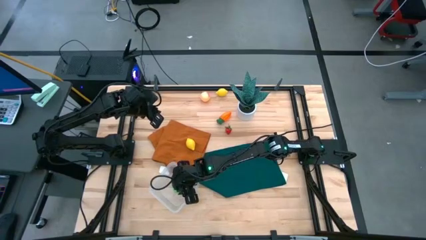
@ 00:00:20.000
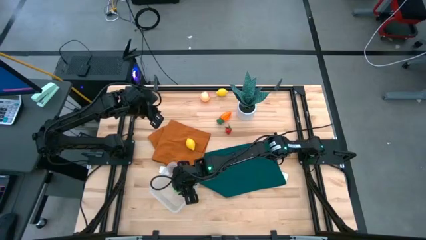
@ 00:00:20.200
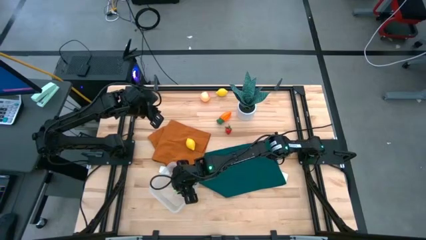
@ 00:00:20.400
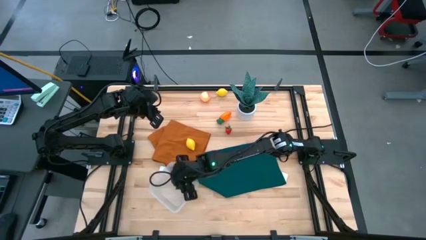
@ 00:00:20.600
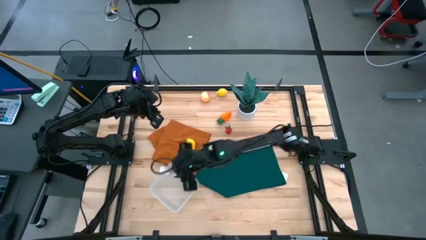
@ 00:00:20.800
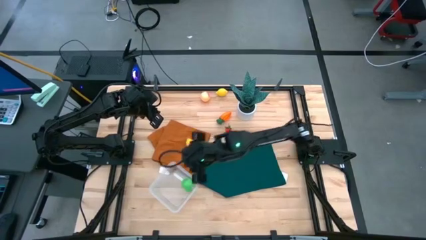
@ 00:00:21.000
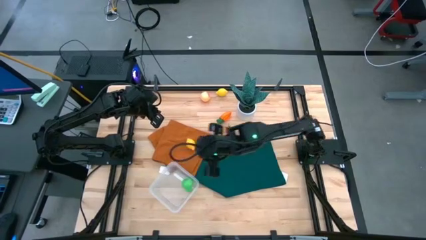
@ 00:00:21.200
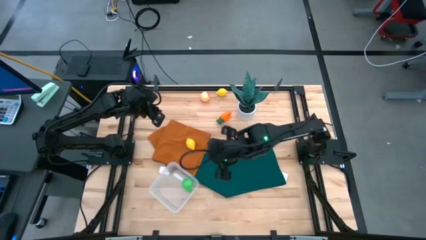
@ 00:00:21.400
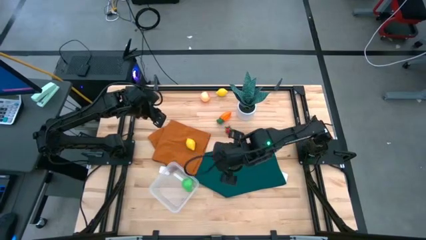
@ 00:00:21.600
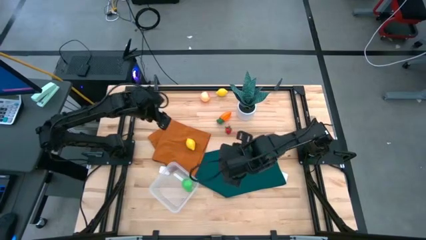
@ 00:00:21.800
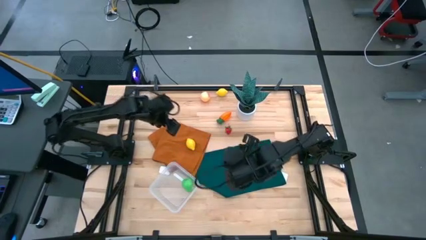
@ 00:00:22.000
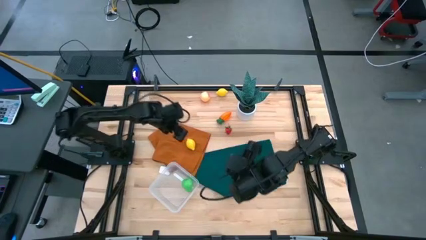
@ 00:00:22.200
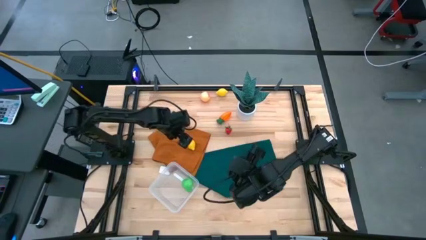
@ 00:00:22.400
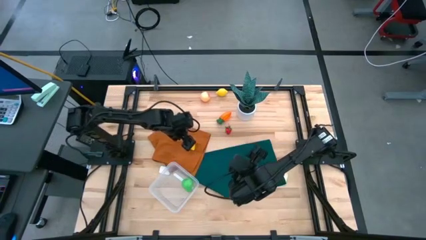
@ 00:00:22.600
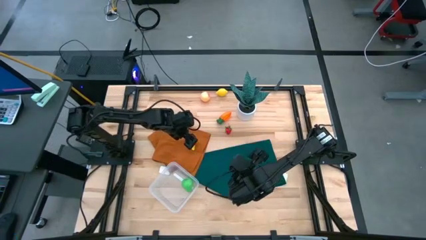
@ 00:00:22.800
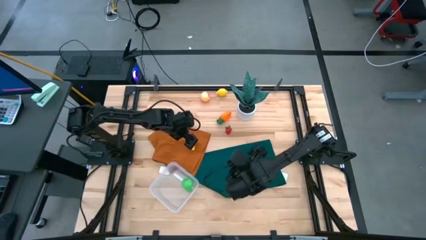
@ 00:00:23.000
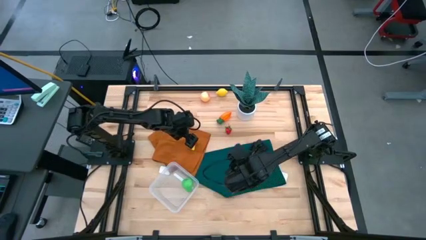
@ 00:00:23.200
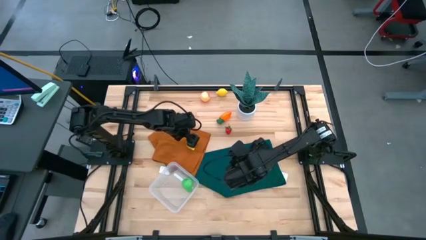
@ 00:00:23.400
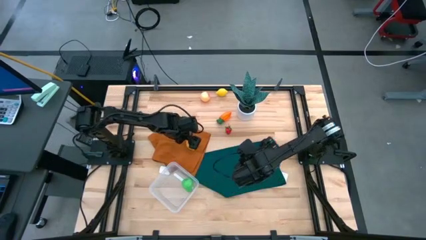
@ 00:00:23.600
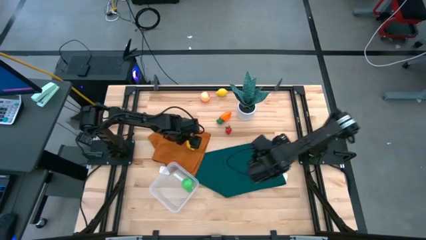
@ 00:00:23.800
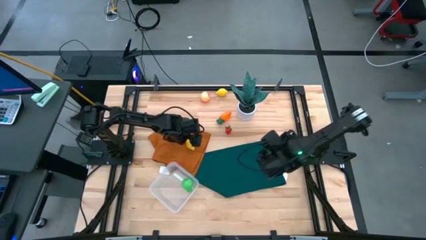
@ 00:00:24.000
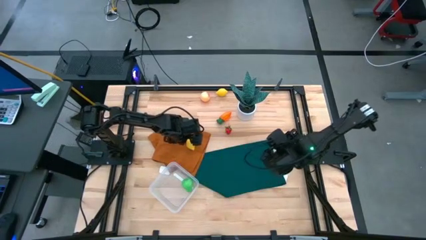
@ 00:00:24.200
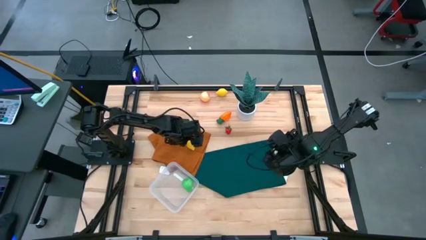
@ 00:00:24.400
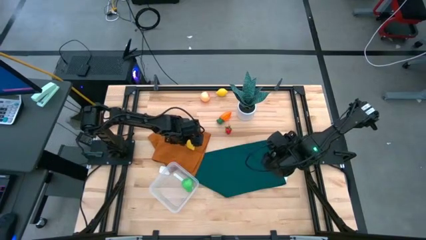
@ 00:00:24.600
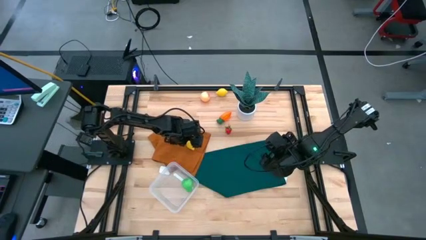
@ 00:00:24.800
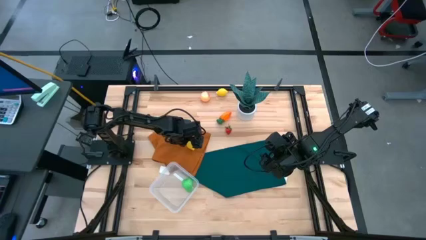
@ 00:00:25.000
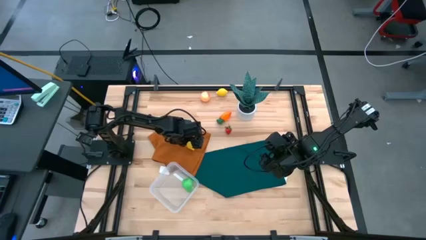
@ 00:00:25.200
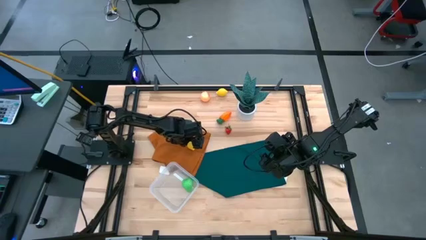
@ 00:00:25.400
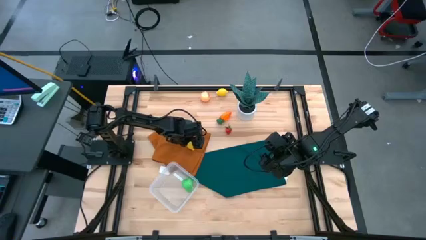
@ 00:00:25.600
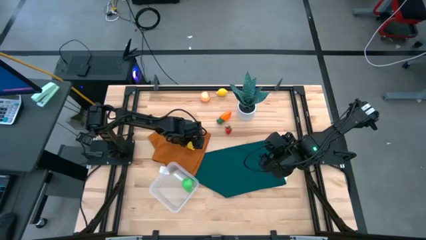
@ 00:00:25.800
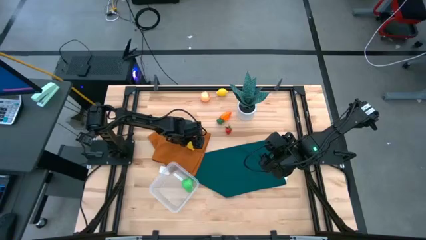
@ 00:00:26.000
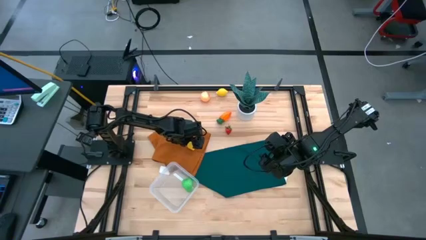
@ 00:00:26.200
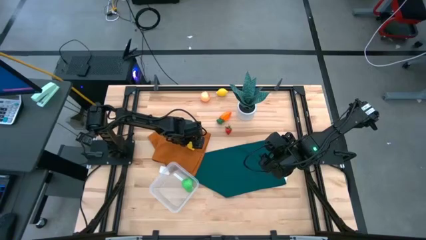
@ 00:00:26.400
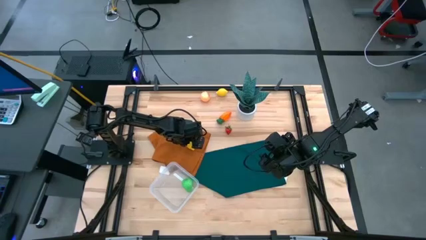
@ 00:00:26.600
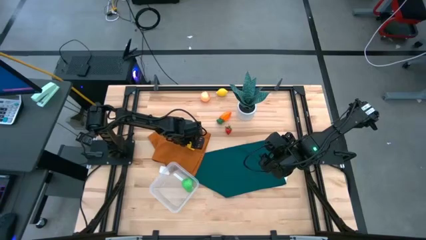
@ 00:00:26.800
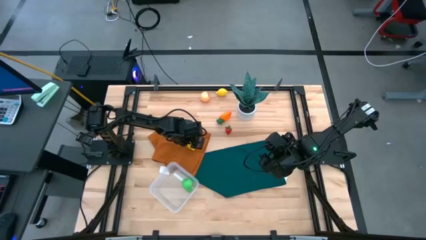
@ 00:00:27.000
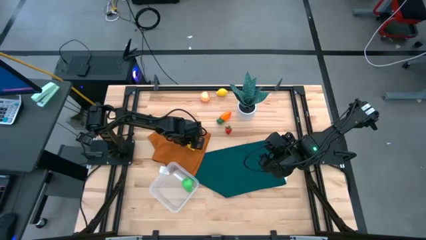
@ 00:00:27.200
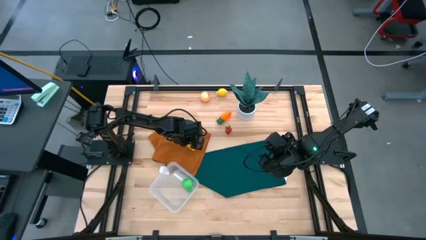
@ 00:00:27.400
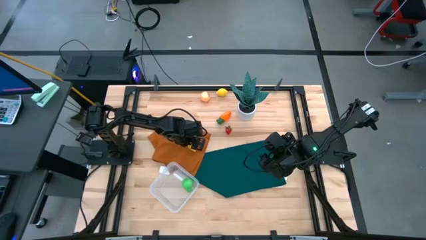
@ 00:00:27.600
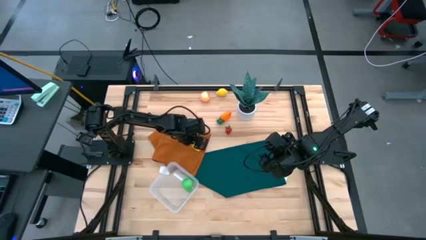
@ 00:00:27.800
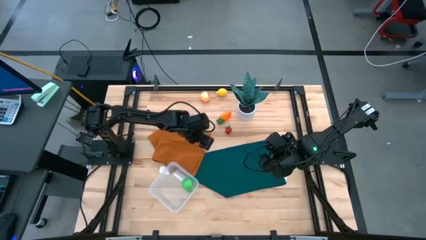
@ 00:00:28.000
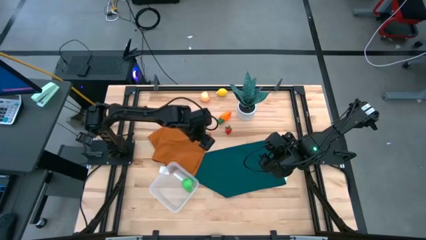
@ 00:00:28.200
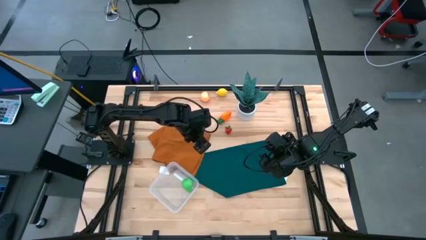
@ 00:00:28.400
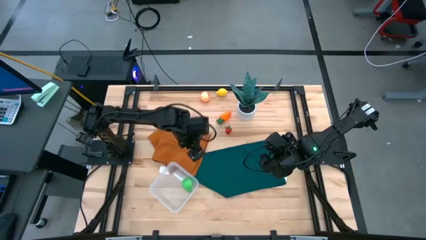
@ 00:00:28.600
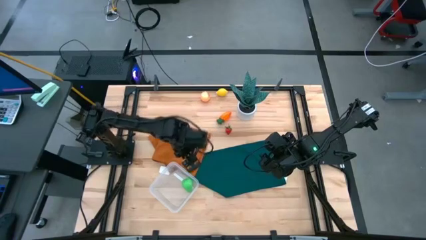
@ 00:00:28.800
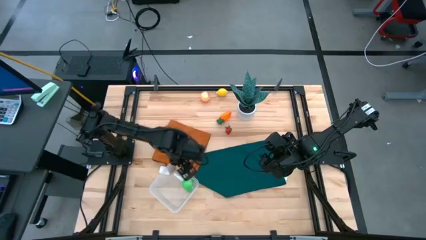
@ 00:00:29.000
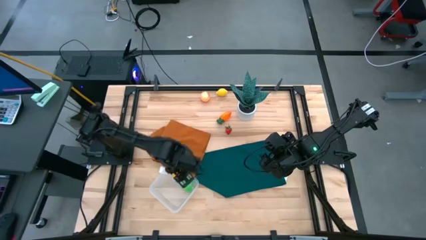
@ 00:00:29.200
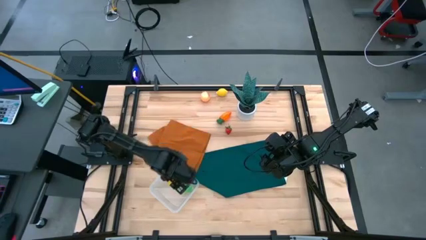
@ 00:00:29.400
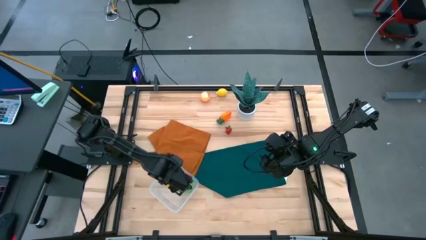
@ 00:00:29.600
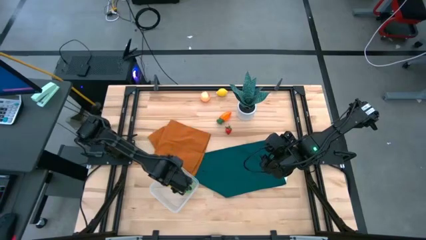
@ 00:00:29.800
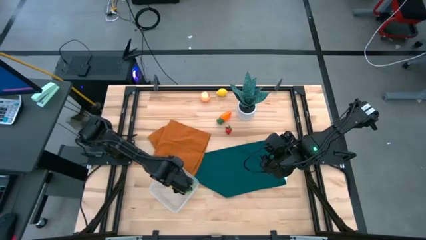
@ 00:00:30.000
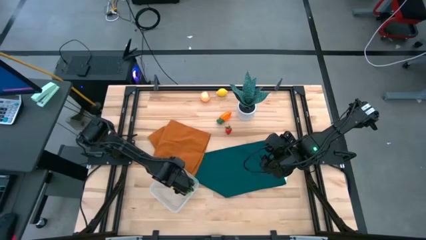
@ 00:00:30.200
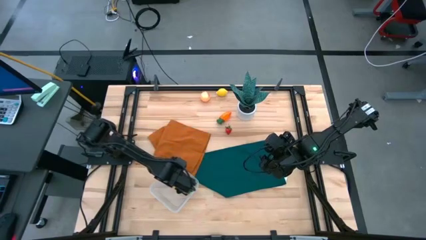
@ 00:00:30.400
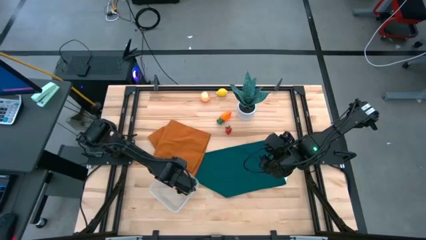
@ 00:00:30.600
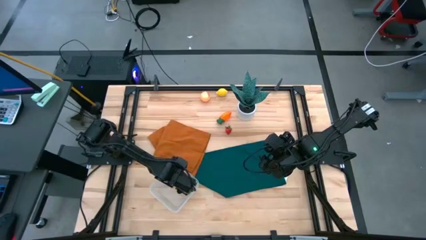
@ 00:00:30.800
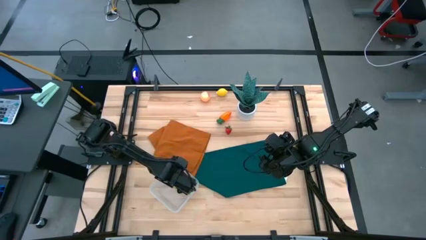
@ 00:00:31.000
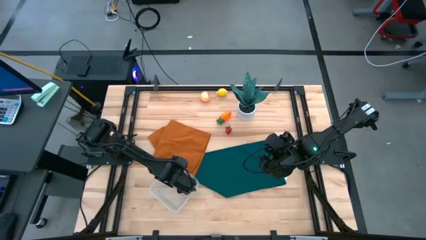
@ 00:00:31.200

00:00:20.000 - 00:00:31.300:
Task: Pick and placing Produce into tupperware
Put the bottom lemon into the transparent container
